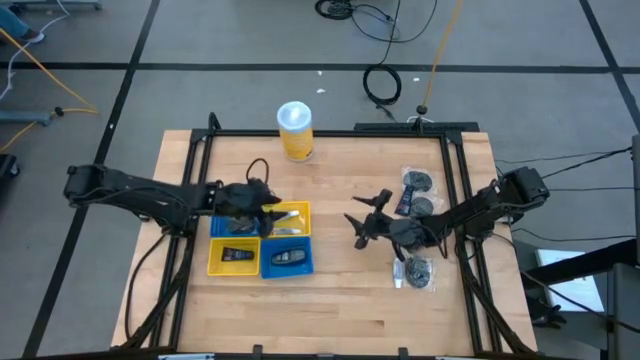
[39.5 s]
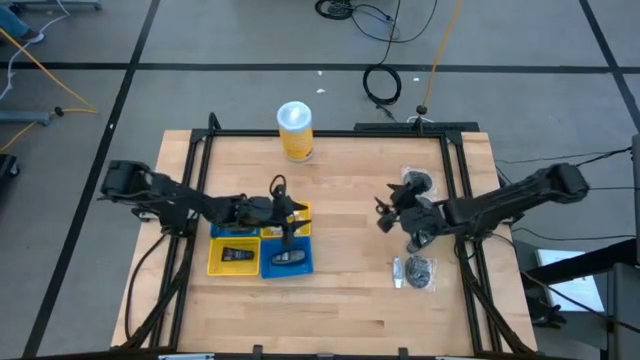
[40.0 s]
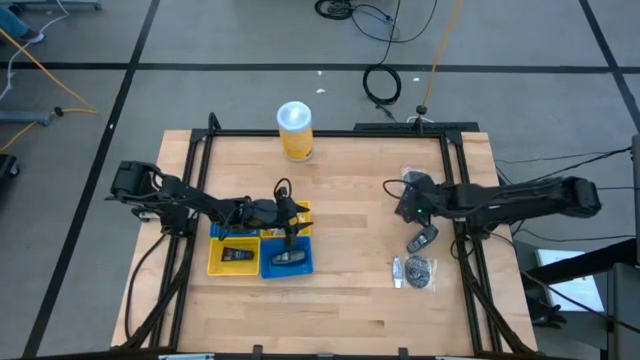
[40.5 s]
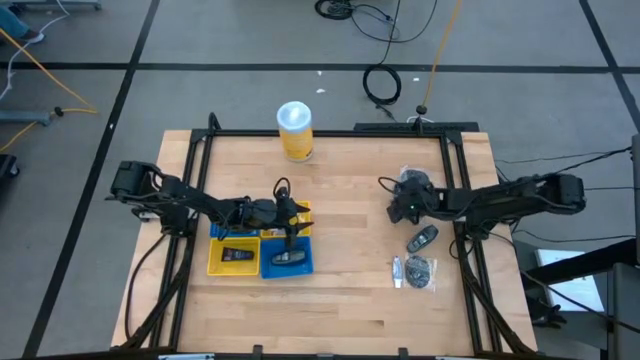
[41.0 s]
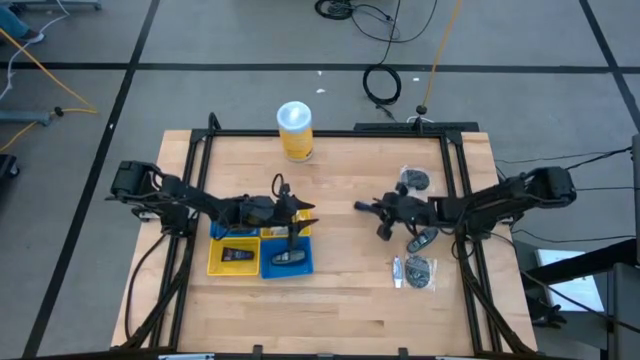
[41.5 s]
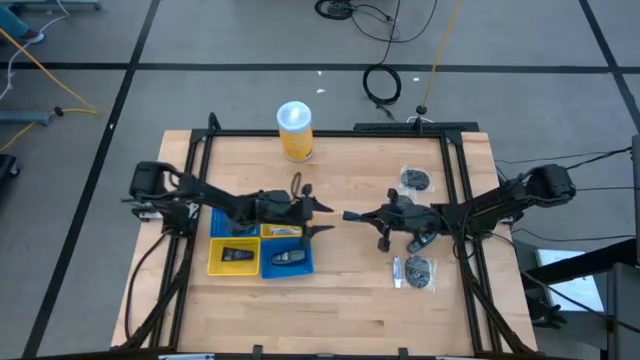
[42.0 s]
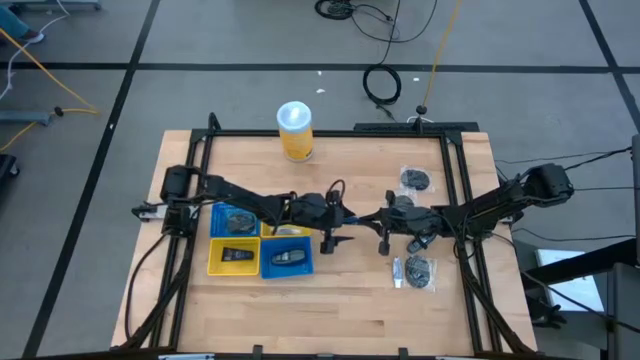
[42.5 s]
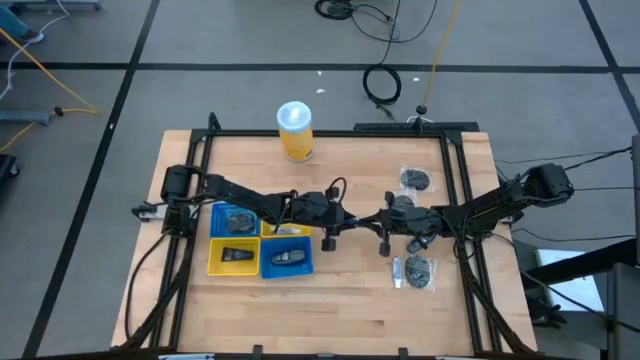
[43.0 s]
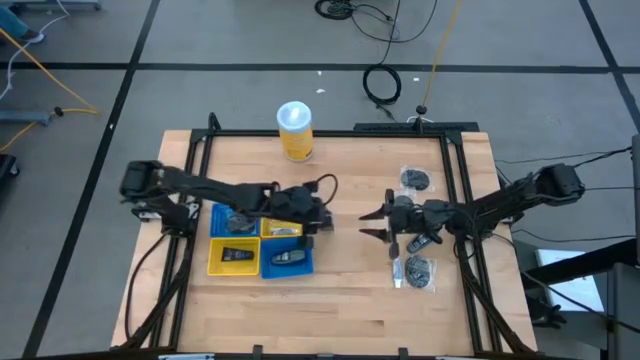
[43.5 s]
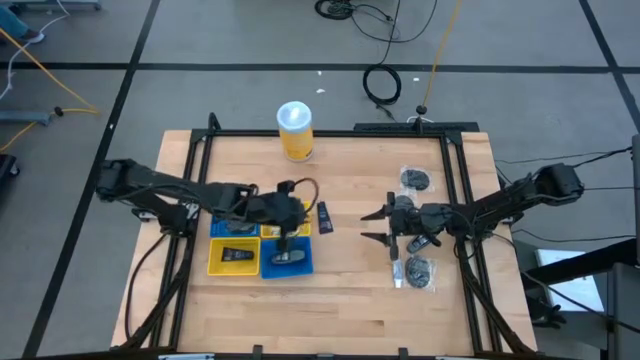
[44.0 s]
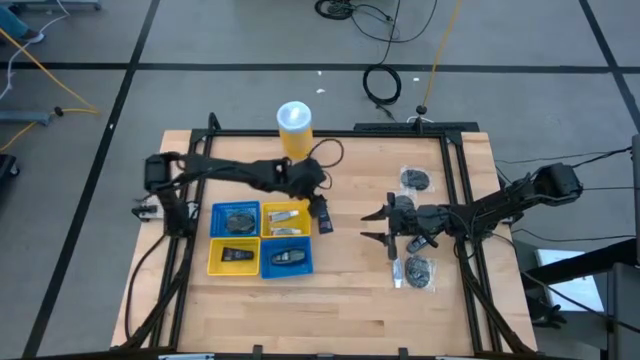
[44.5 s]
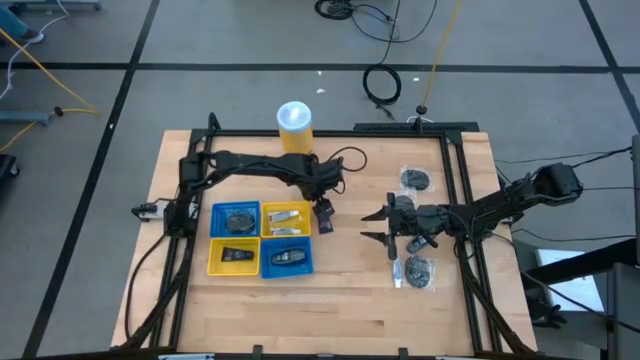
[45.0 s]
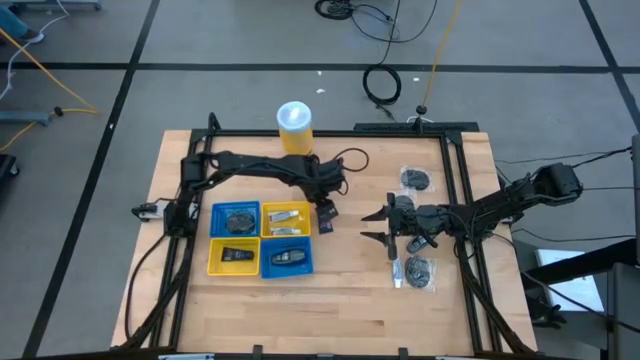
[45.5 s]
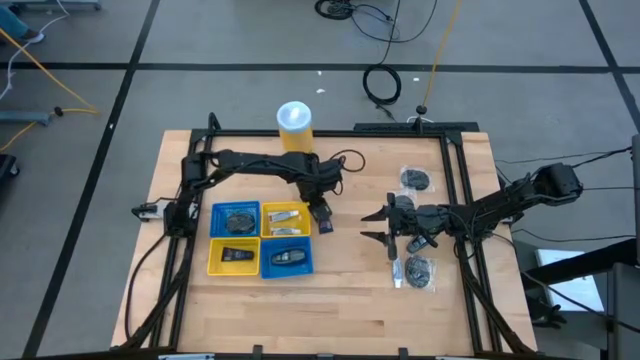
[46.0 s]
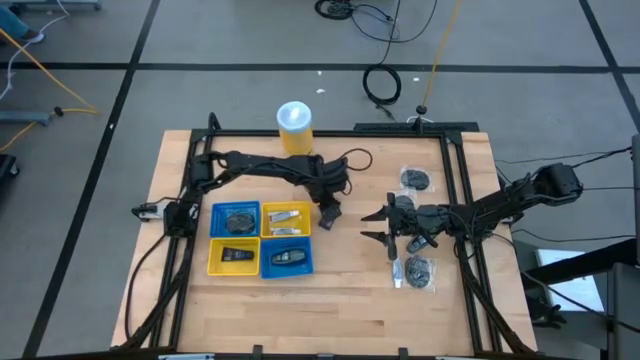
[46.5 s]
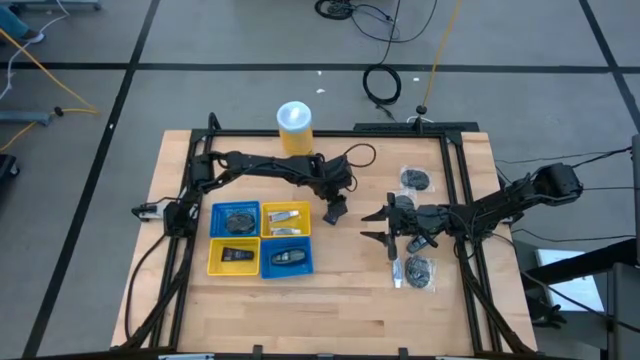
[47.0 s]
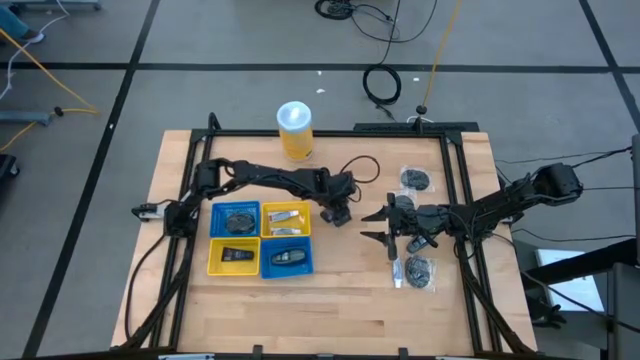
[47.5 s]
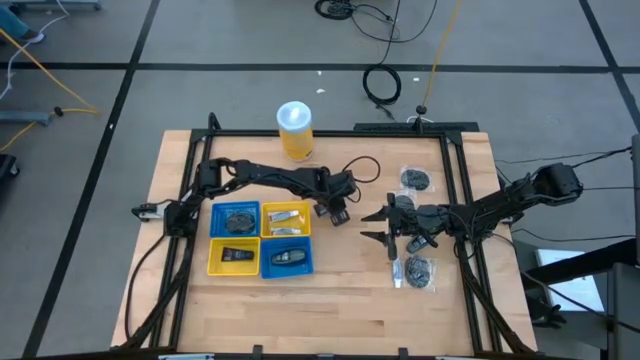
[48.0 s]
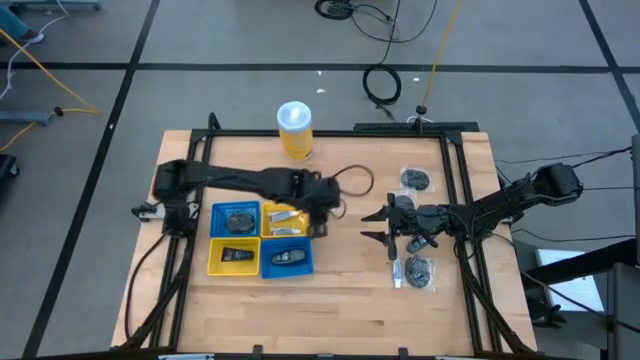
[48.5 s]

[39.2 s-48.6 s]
Task: Pick & Place Travel size toiletries
Put the blue shave cream into the bottom yellow bin

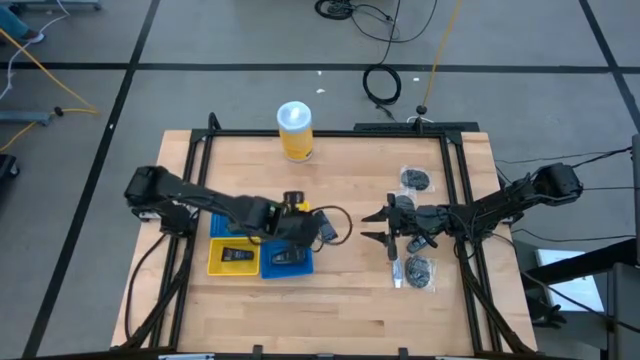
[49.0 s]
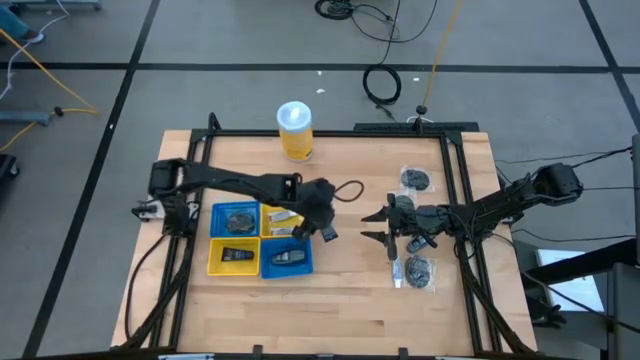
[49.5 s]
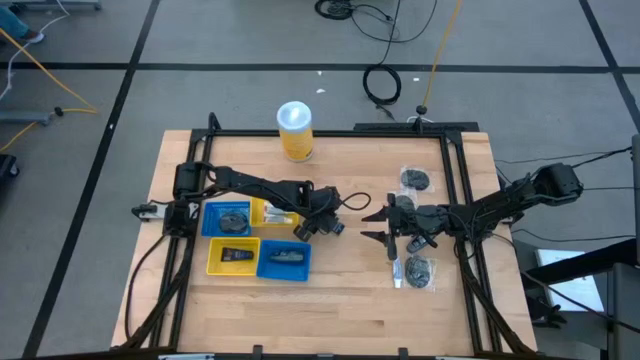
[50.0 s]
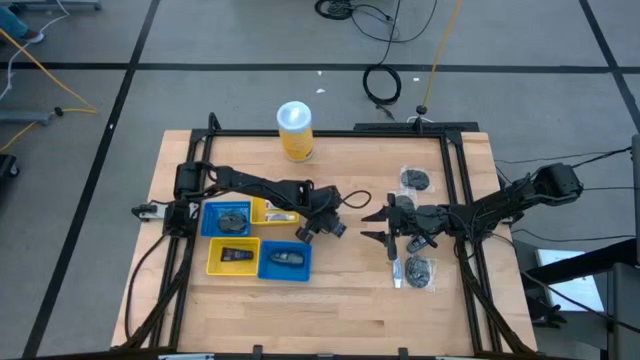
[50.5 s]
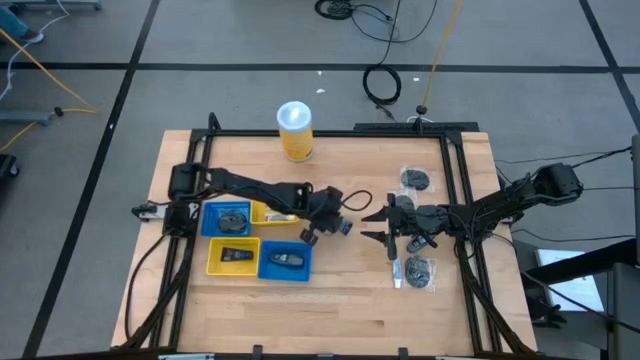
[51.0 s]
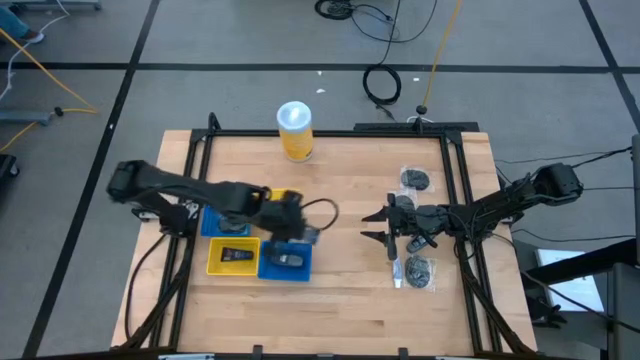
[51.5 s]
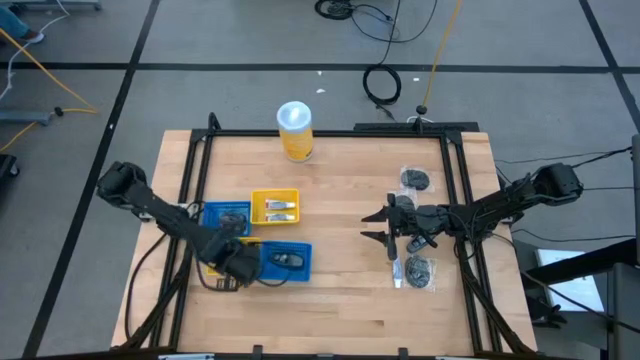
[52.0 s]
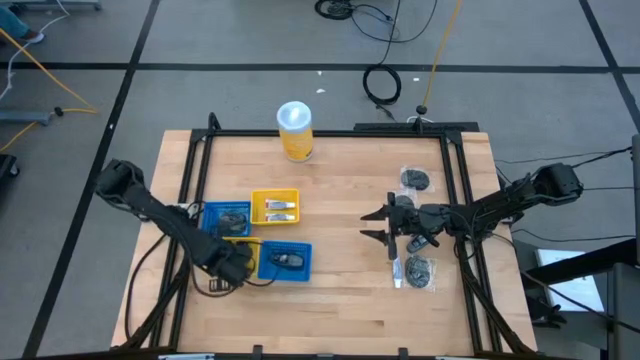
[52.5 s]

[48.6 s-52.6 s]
Put the blue shave cream into the bottom yellow bin

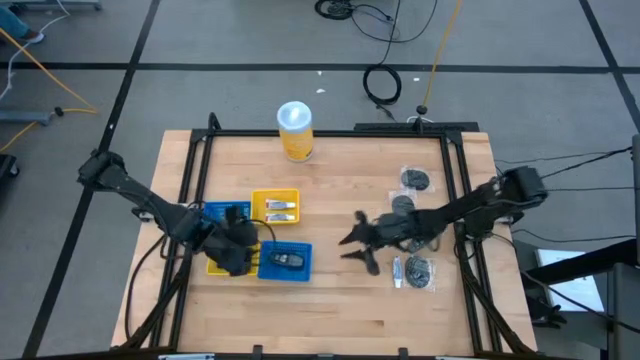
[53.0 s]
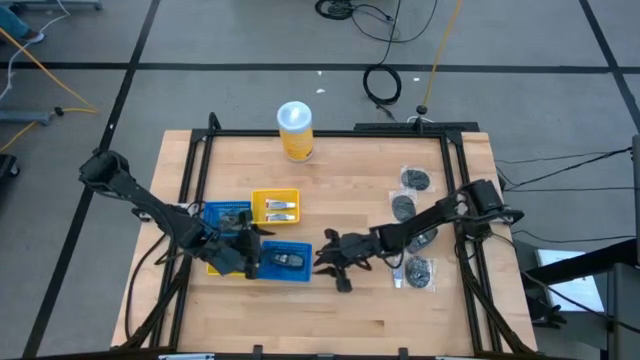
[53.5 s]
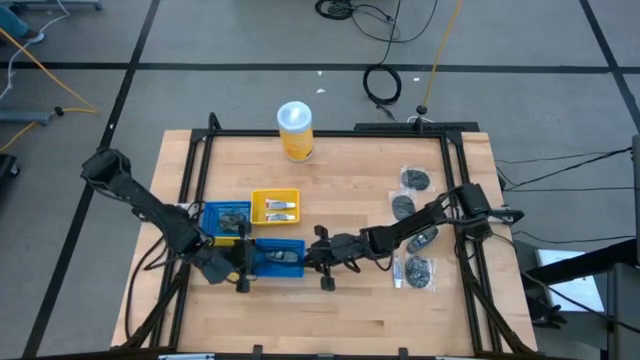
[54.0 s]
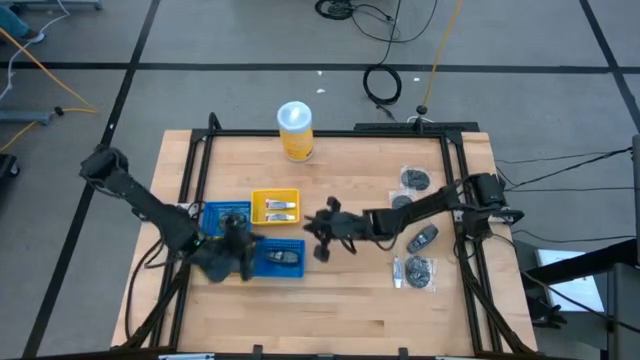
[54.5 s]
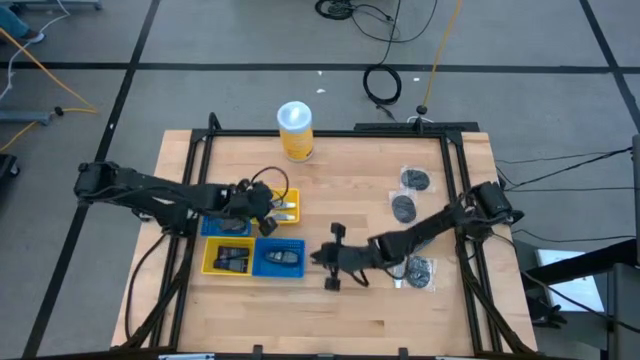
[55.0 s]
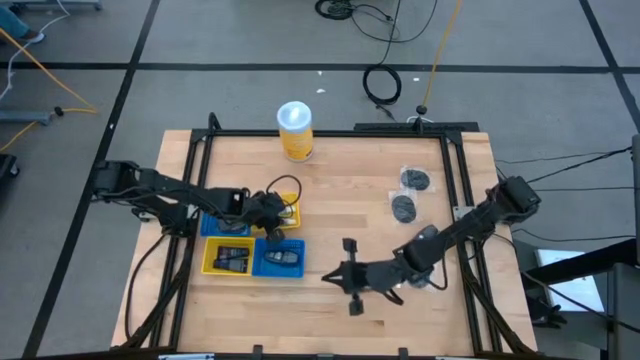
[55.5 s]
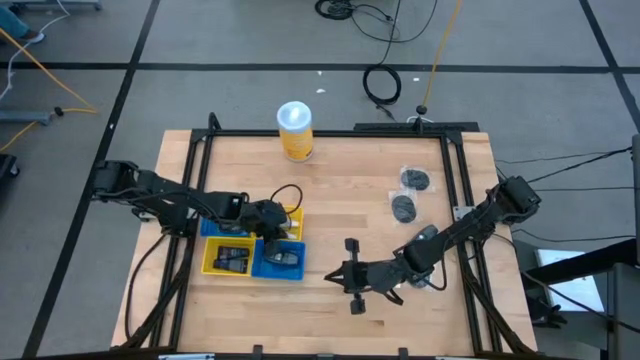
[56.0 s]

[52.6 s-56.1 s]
Adjust the bins

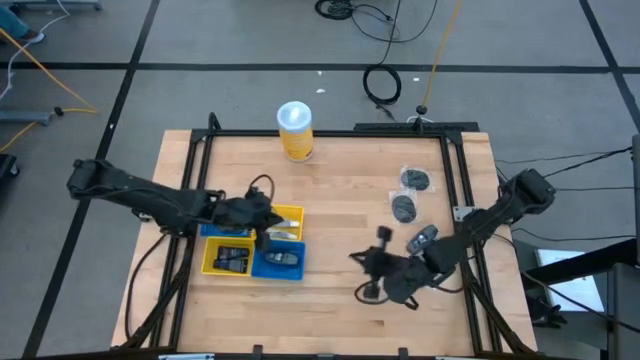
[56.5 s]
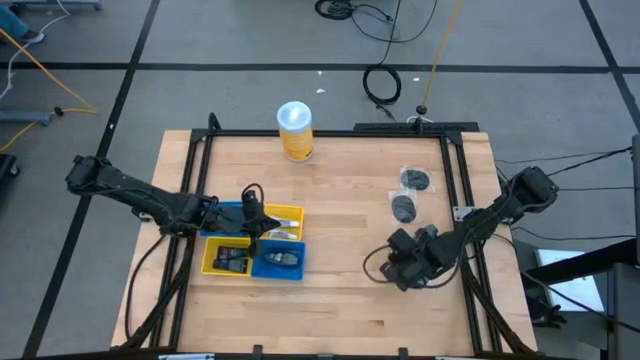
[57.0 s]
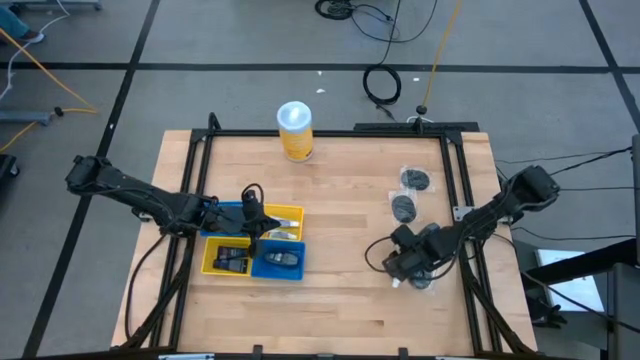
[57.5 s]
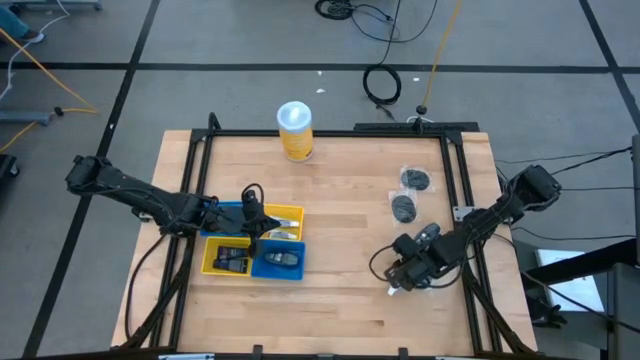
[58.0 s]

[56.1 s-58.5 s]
Put the white toothpaste into the top yellow bin

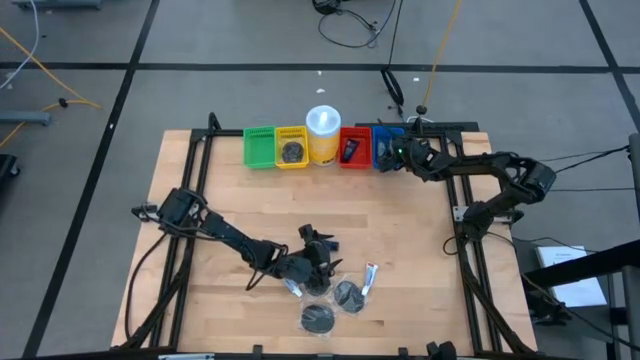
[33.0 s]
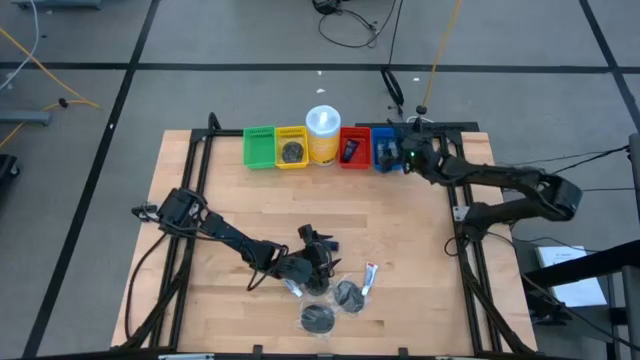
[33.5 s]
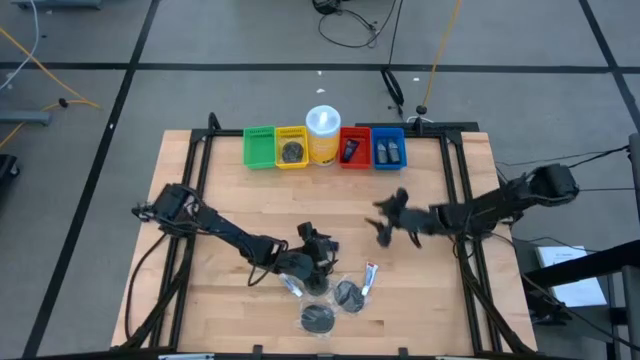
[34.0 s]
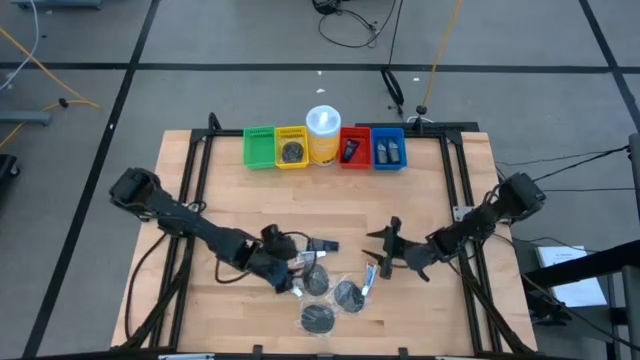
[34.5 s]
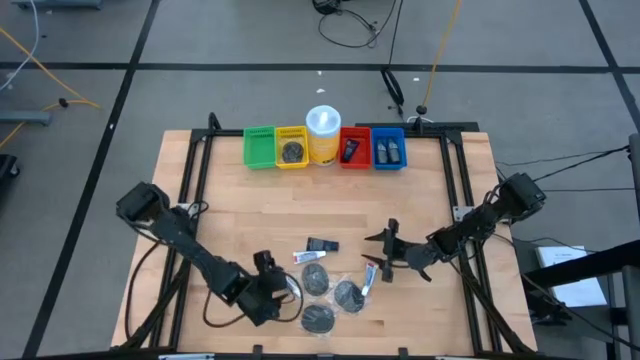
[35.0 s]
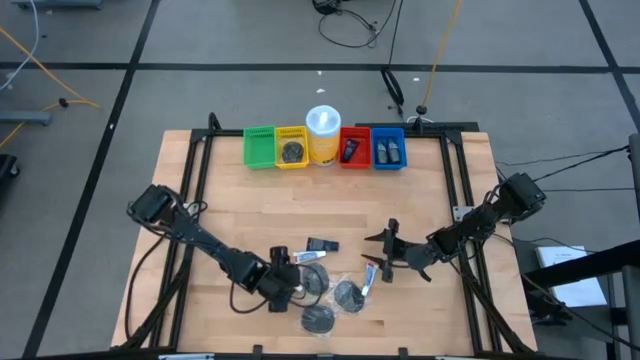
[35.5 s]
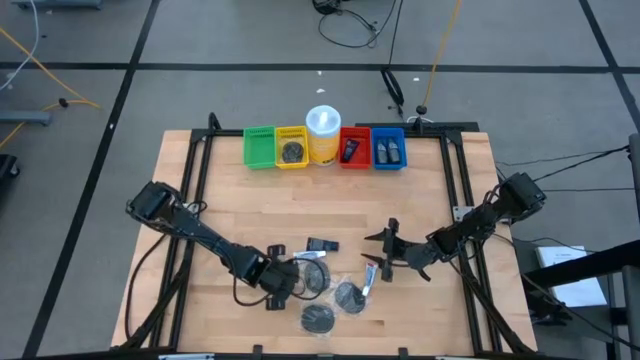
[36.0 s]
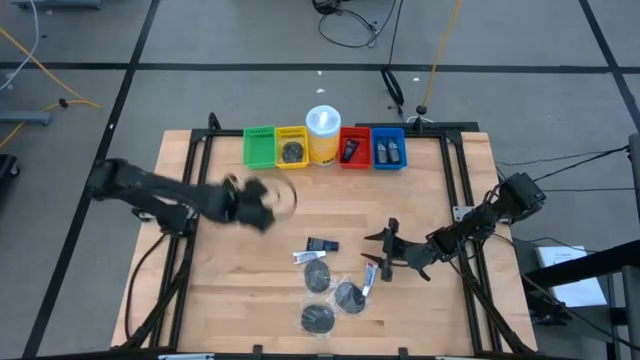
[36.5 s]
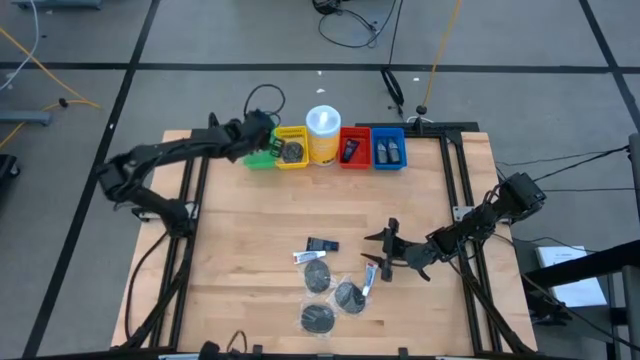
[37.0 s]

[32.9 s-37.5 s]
Task: Pick & Place Travel size toiletries
Put the white toothpaste into the green basket
